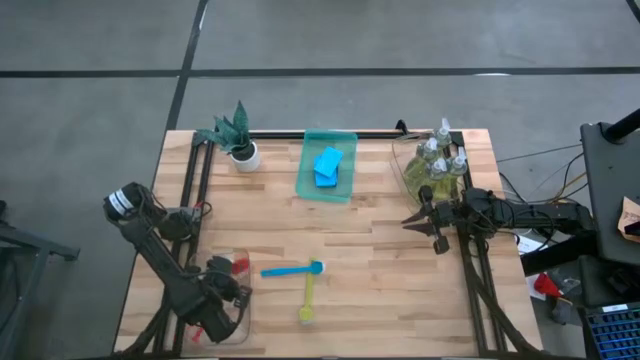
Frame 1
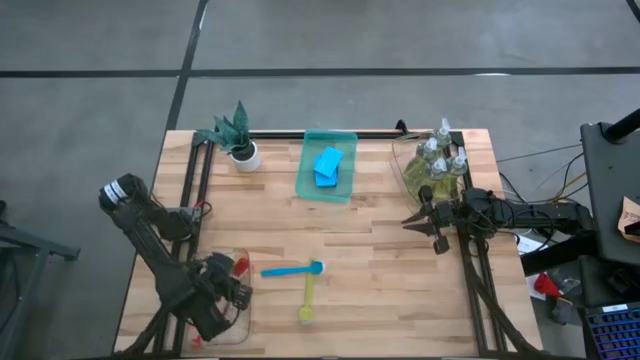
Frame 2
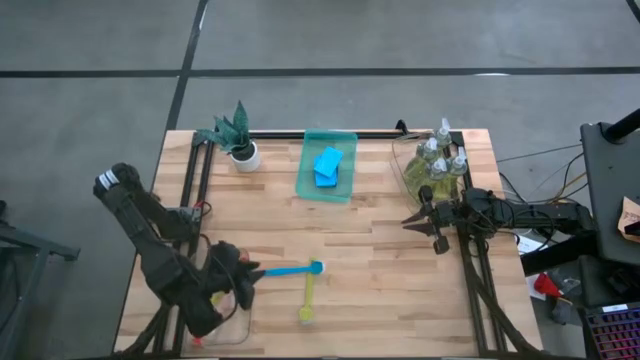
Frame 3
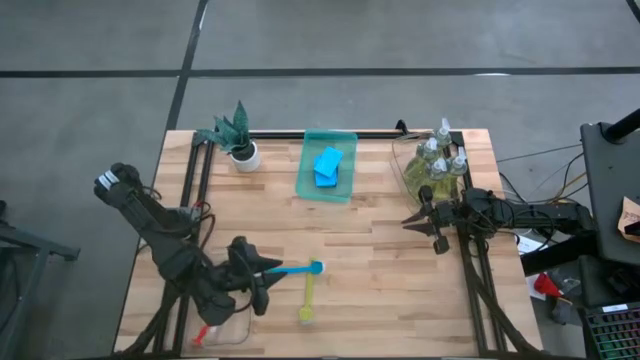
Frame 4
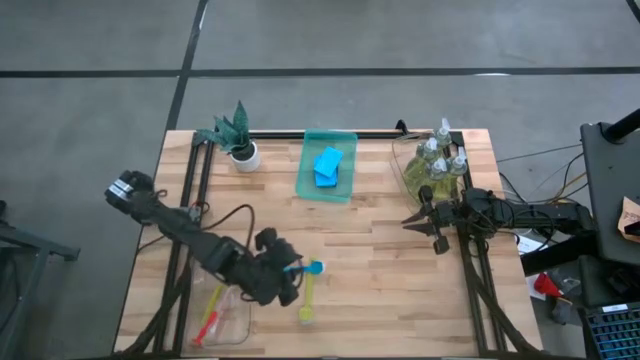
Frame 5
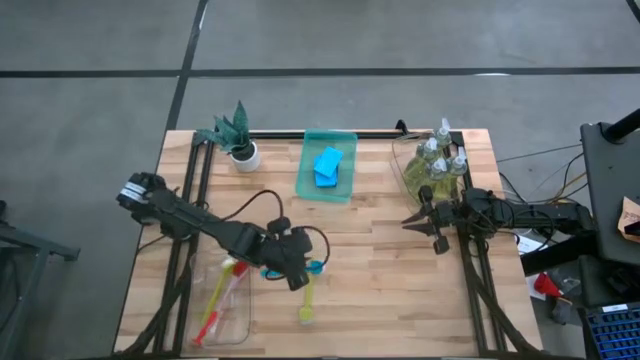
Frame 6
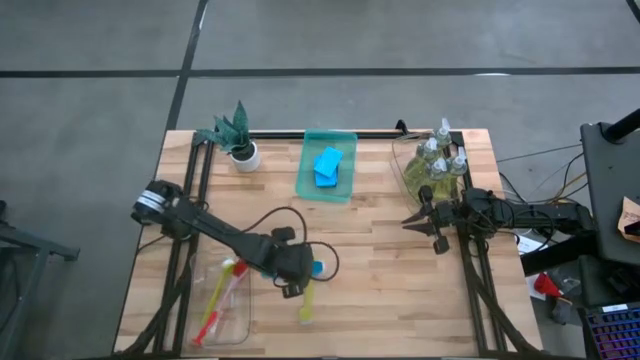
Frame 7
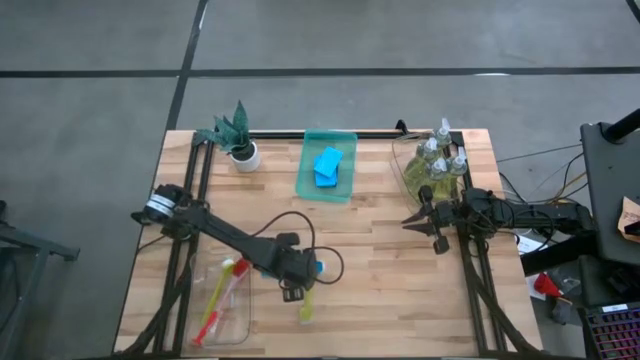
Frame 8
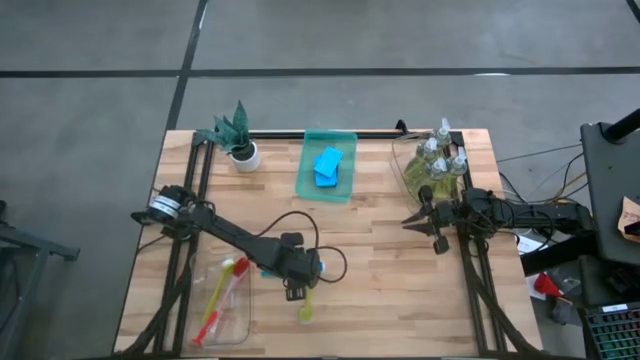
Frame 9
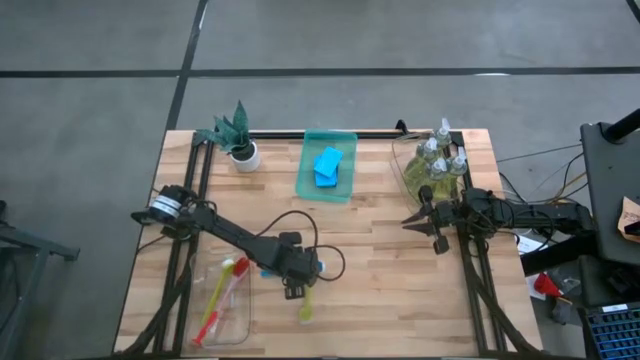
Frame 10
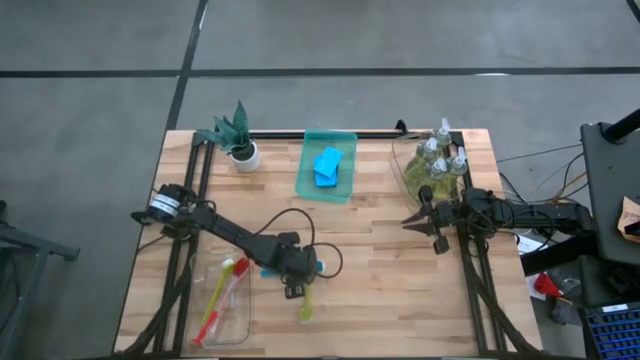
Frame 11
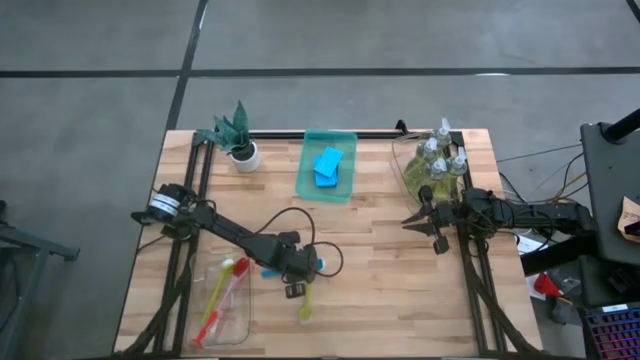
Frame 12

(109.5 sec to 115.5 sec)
Task: Pick & Place Kitchen Sink Supplies
Put the blue dish brush into the bottom transparent bin

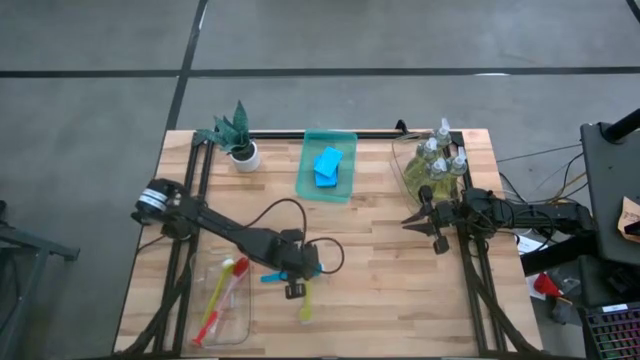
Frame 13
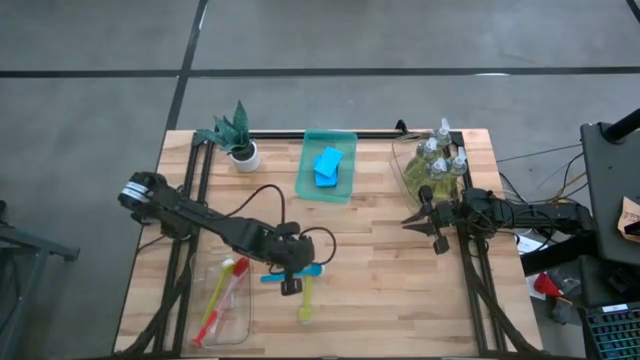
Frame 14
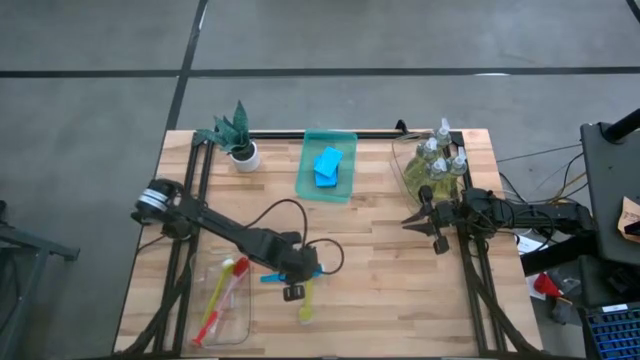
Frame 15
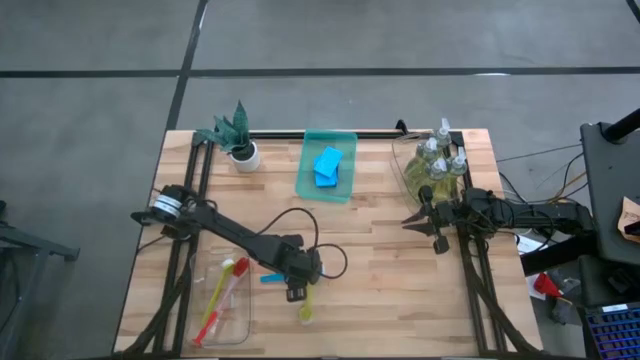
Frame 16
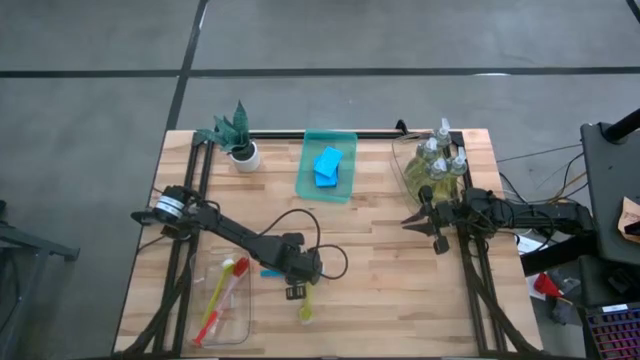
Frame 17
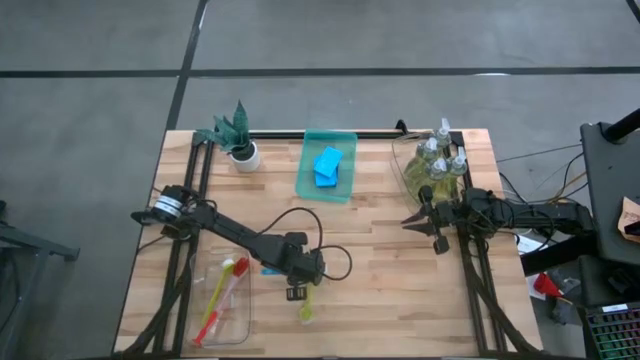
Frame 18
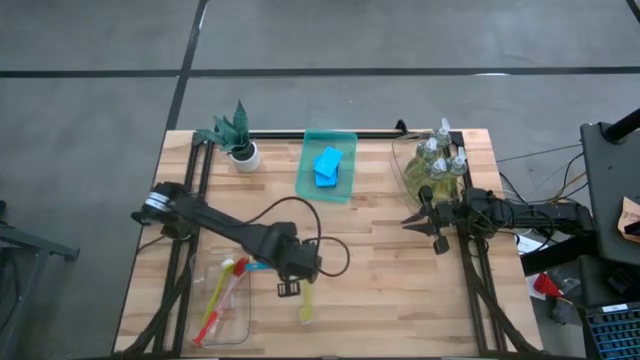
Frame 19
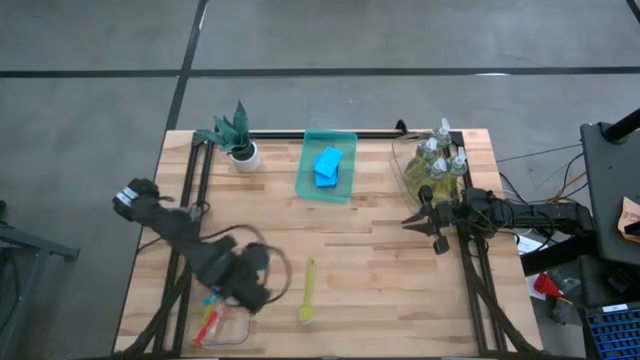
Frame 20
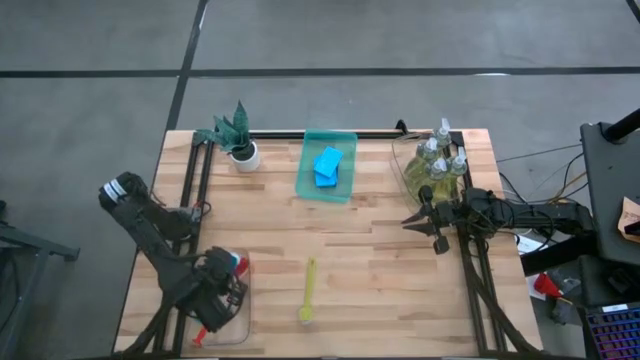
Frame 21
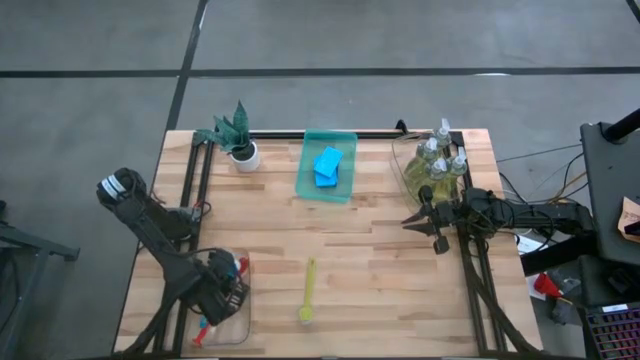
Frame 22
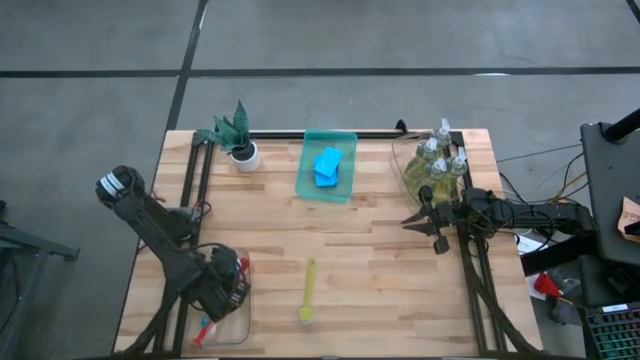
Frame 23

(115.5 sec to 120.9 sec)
Put the blue dish brush into the bottom transparent bin

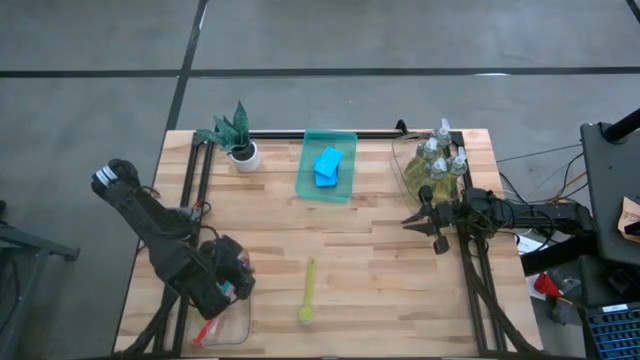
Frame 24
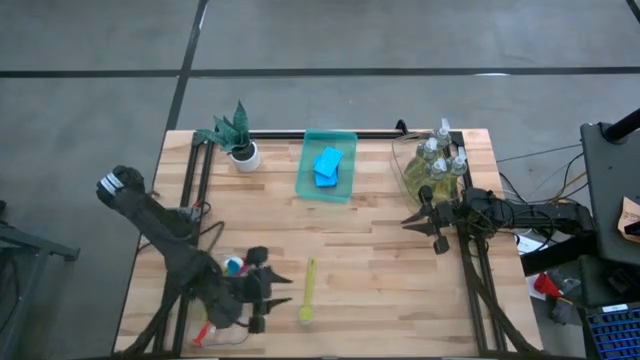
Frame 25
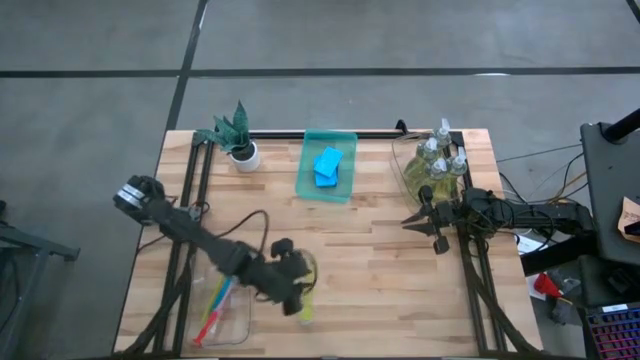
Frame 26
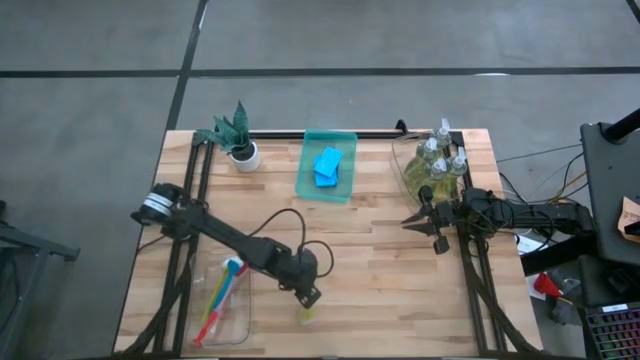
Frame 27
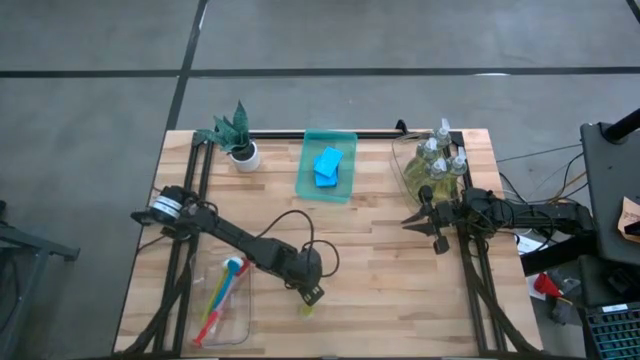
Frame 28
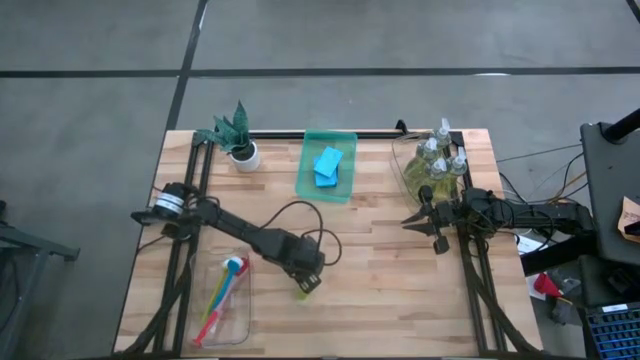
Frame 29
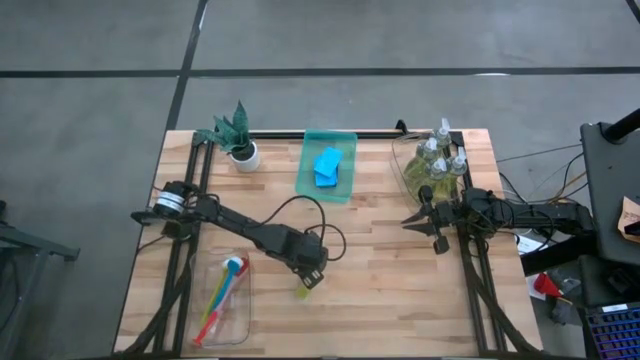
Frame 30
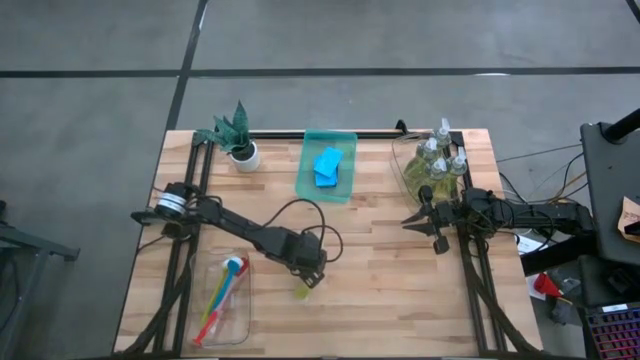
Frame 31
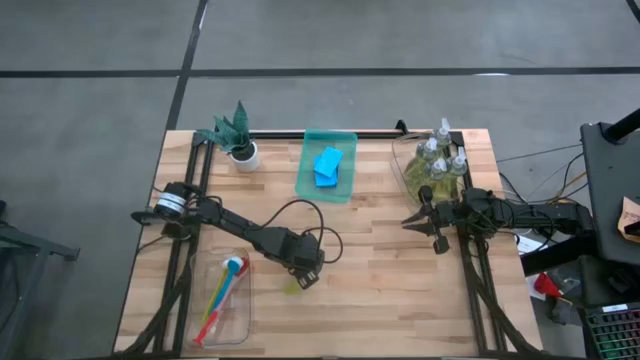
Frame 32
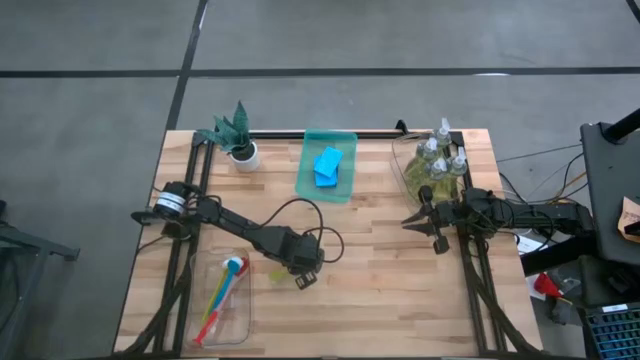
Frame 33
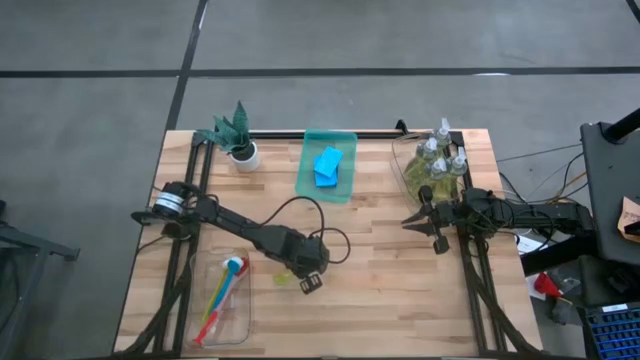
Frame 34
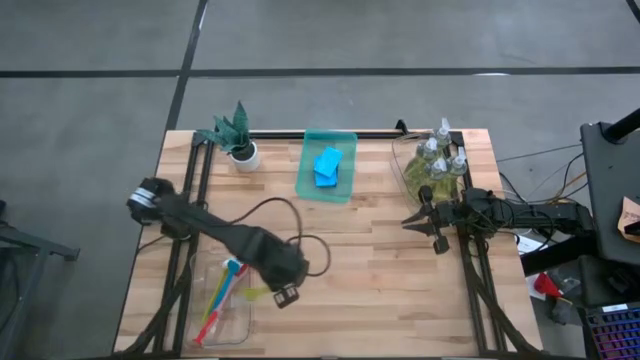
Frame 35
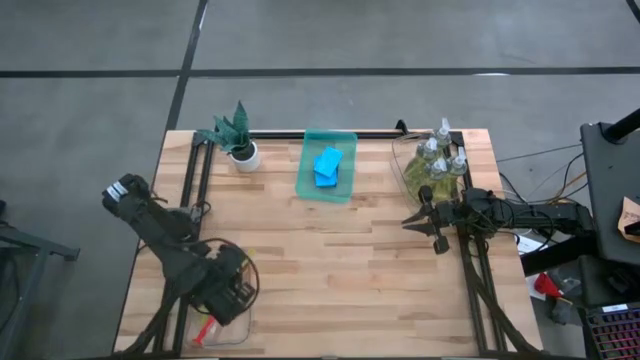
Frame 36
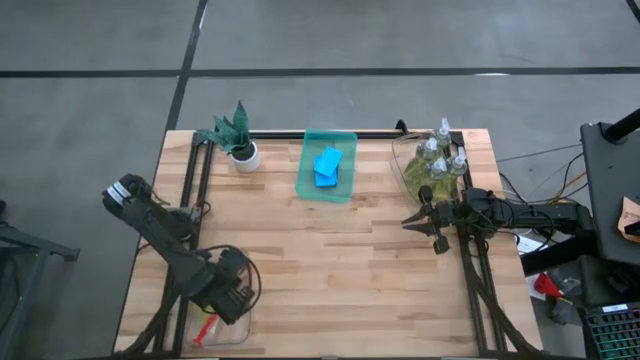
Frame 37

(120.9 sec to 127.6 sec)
Put the green dish brush into the bottom transparent bin
